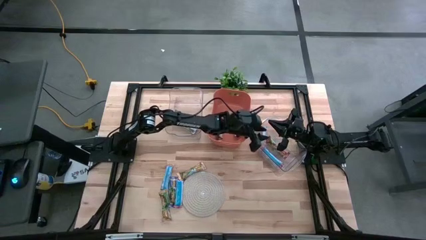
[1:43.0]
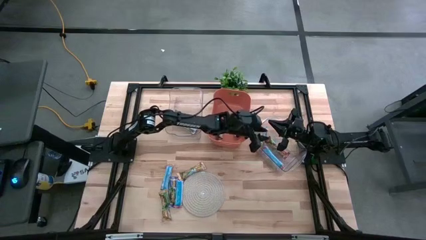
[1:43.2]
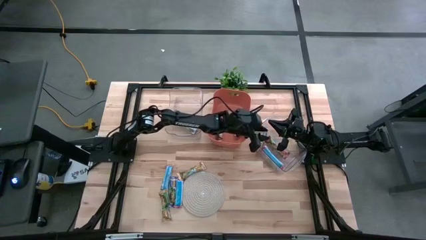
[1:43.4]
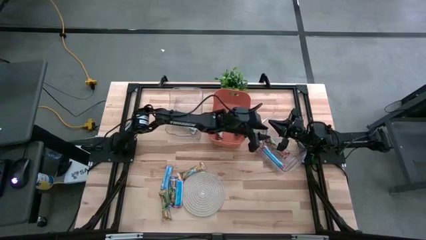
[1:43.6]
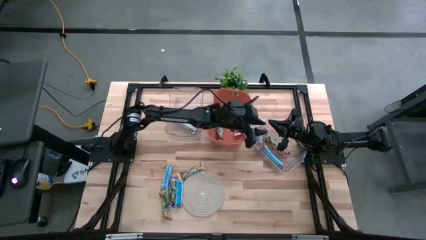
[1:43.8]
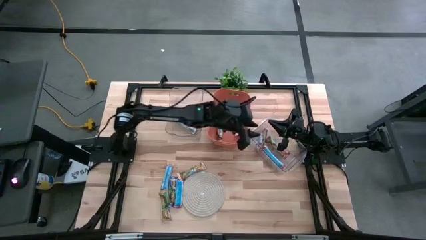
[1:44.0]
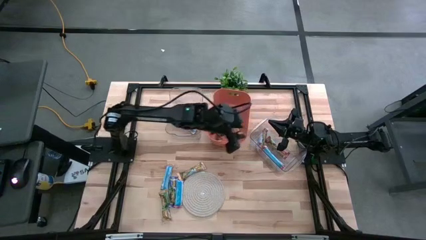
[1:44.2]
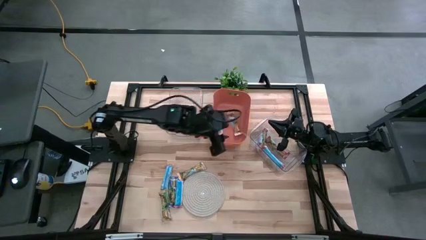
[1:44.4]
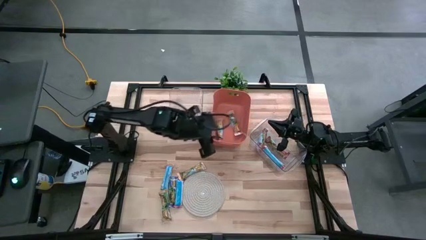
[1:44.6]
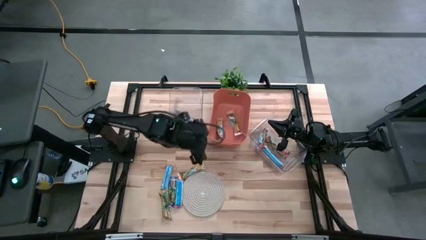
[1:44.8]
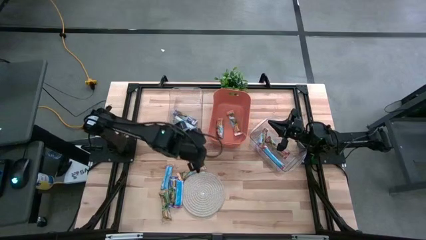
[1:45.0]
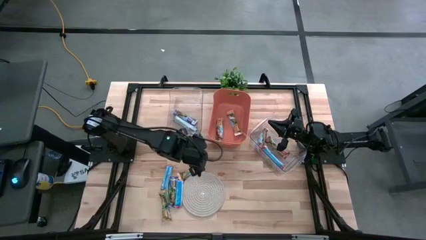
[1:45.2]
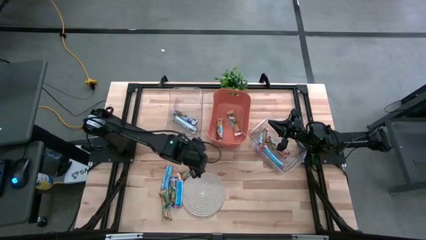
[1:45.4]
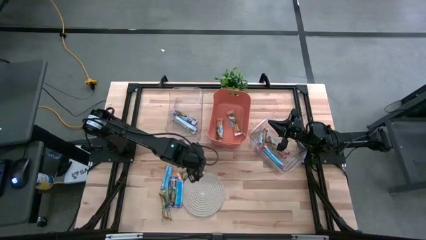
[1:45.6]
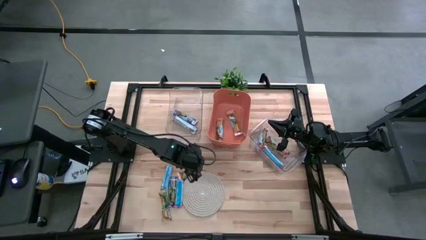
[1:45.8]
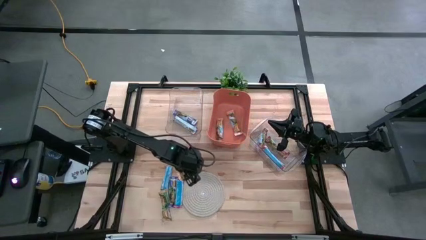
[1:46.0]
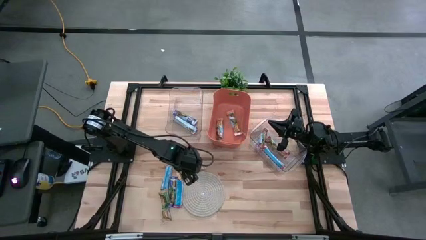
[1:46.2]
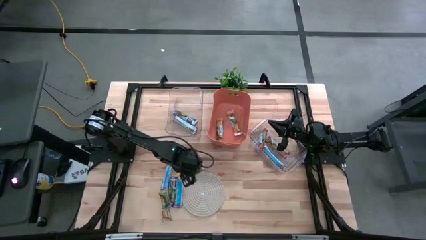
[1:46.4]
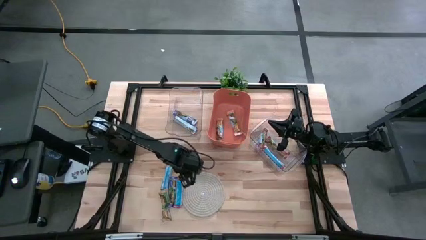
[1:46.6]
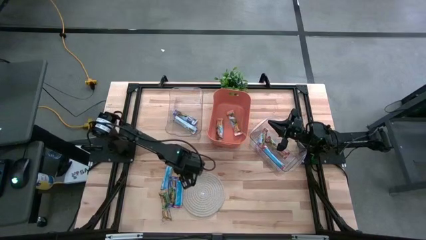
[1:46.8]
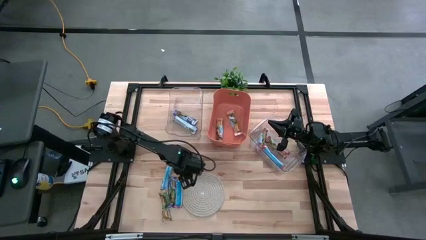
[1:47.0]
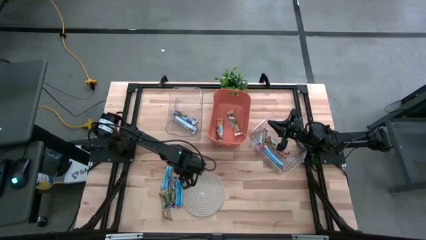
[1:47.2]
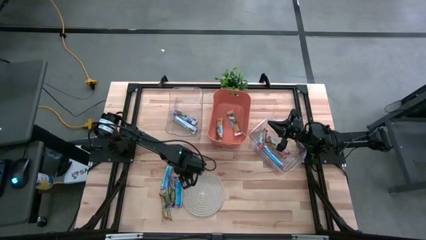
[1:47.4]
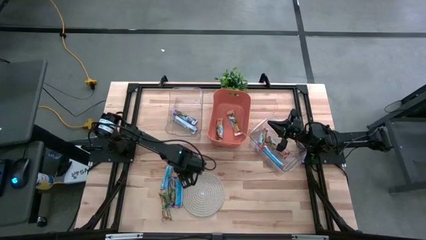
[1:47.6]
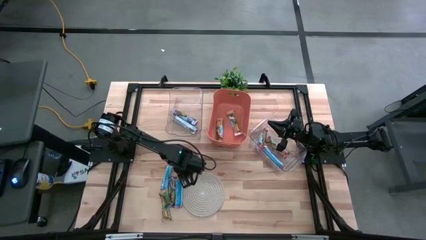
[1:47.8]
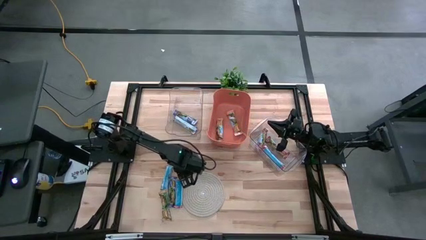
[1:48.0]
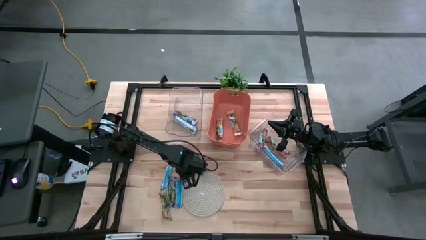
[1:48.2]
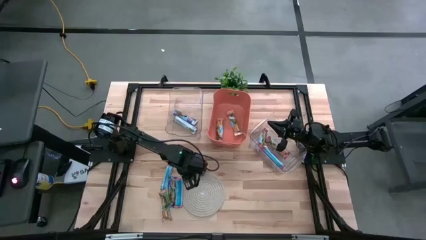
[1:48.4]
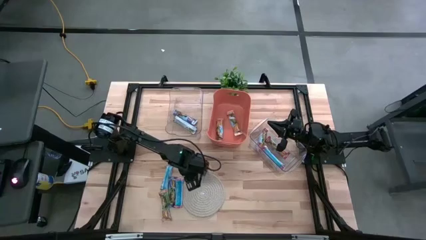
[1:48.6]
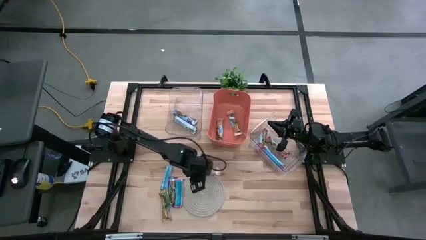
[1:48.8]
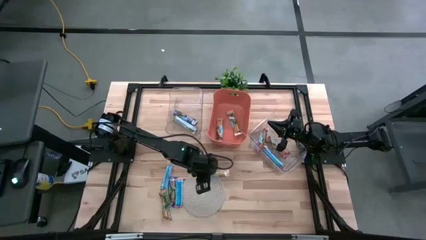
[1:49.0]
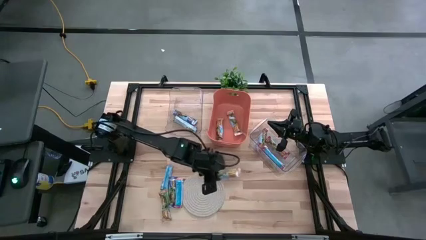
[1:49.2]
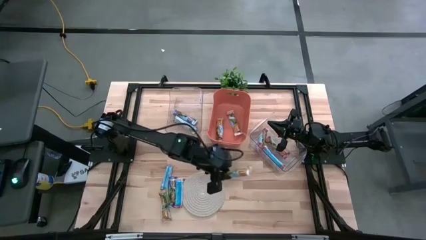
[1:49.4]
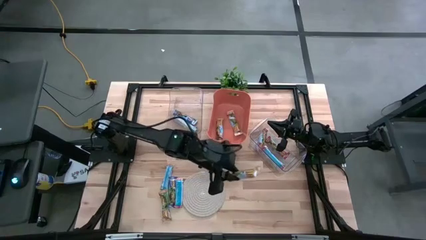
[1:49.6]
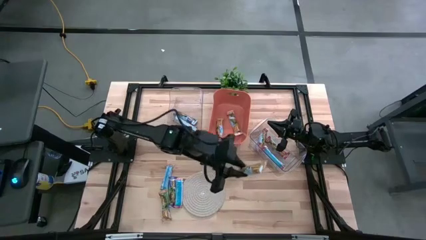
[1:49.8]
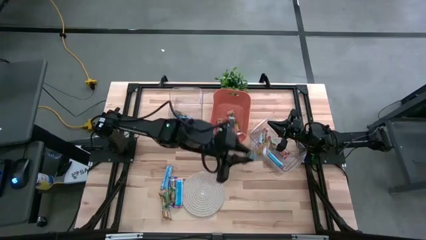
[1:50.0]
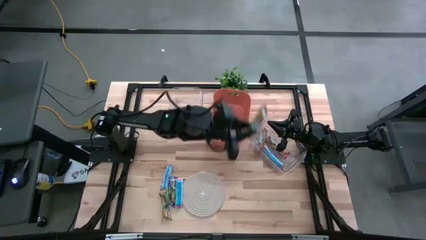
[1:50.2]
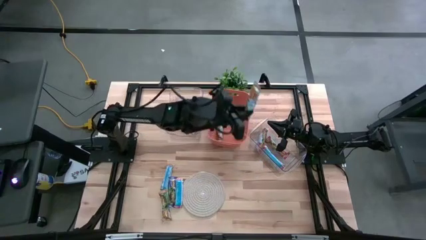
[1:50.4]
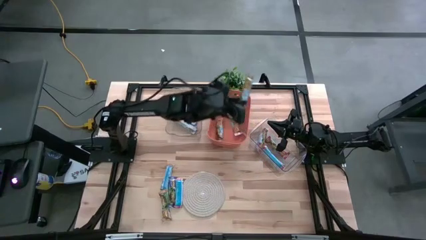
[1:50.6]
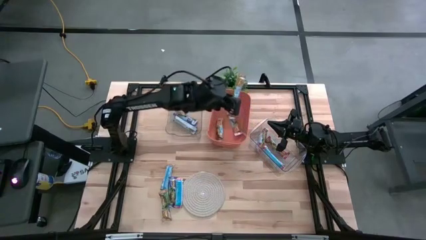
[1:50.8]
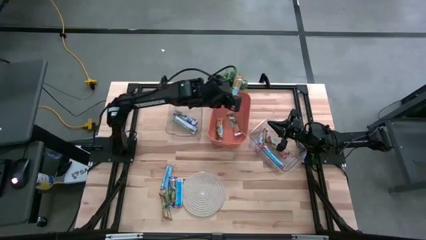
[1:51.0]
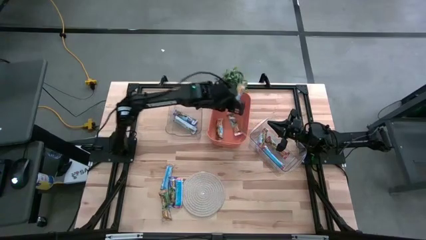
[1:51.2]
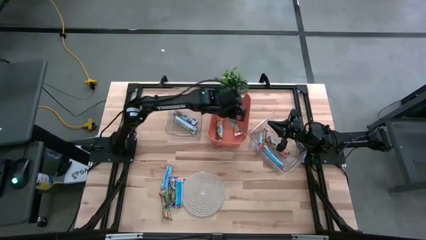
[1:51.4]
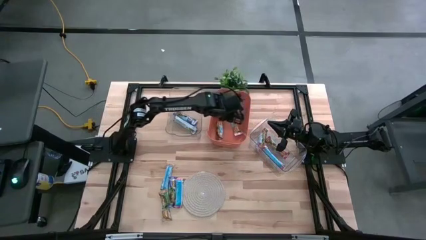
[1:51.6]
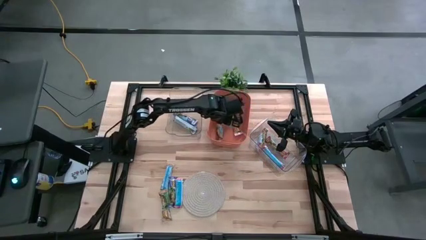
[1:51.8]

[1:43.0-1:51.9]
Task: Pick and place Granola Bars by type
Put the yellow granola bar into the orange bin

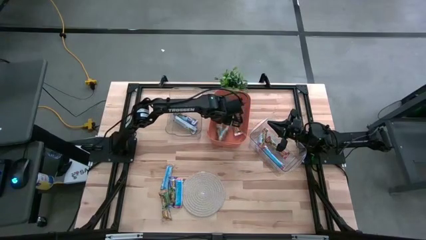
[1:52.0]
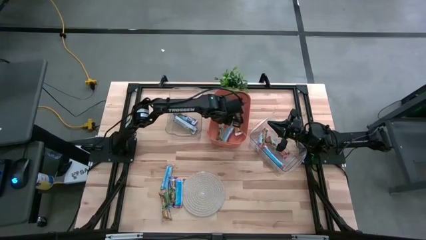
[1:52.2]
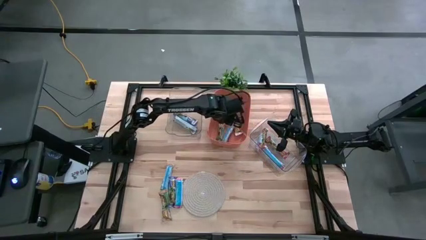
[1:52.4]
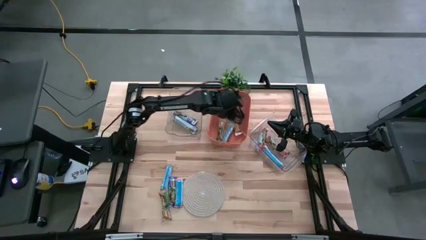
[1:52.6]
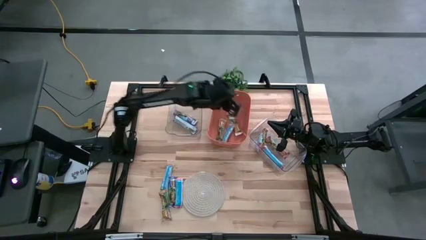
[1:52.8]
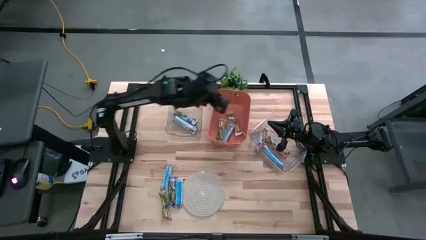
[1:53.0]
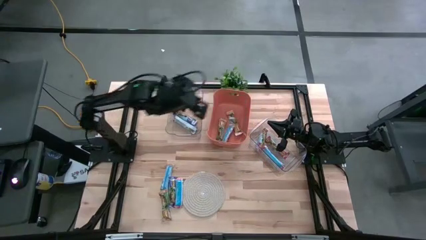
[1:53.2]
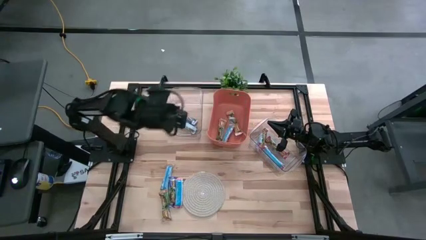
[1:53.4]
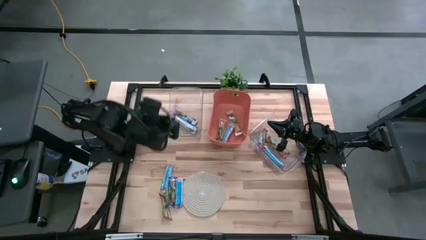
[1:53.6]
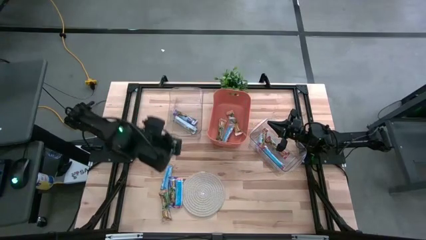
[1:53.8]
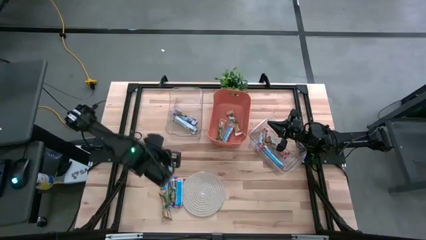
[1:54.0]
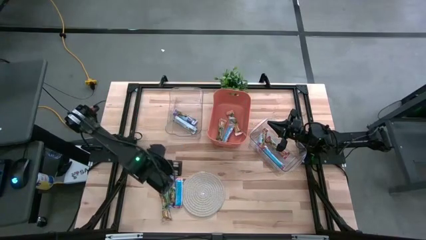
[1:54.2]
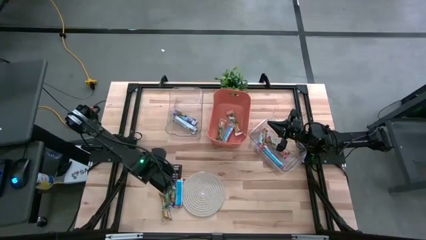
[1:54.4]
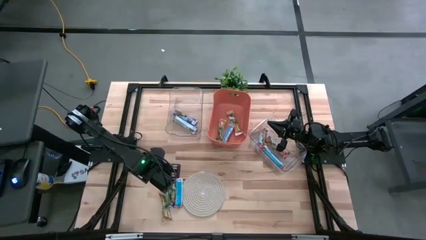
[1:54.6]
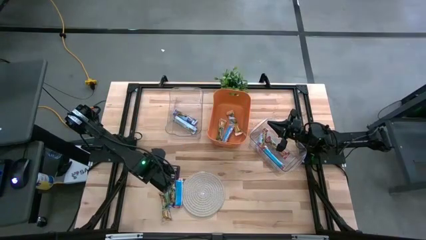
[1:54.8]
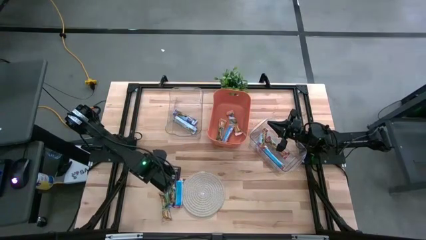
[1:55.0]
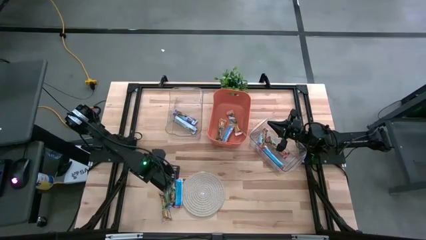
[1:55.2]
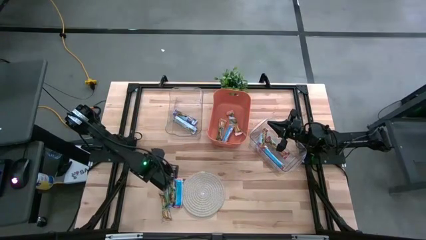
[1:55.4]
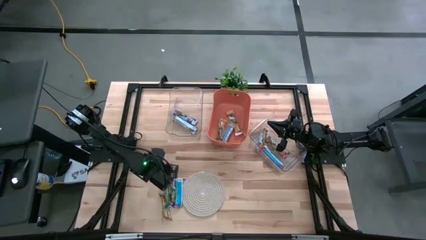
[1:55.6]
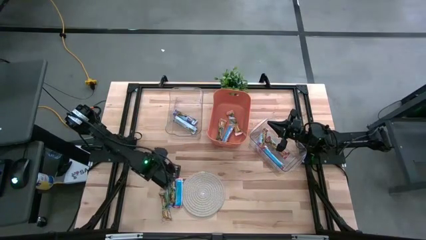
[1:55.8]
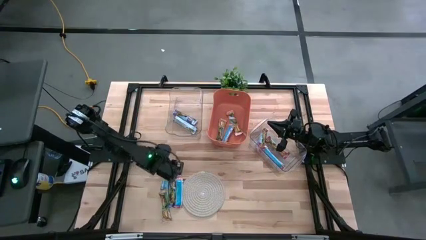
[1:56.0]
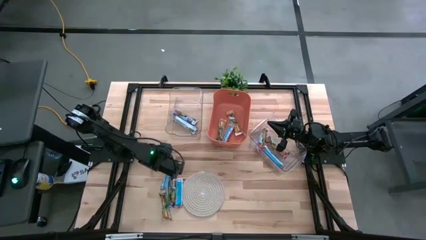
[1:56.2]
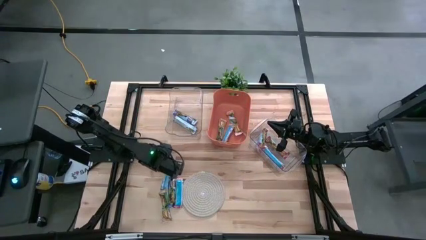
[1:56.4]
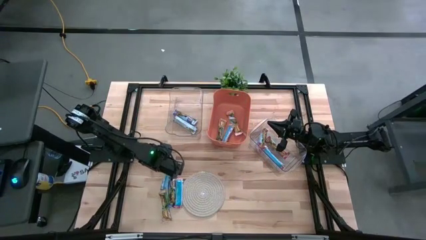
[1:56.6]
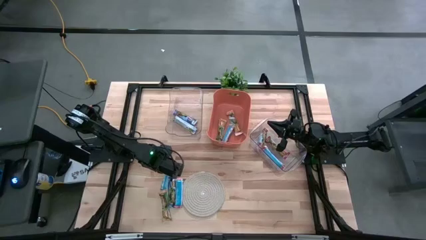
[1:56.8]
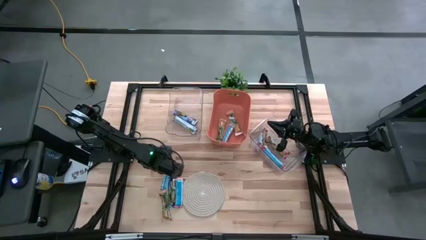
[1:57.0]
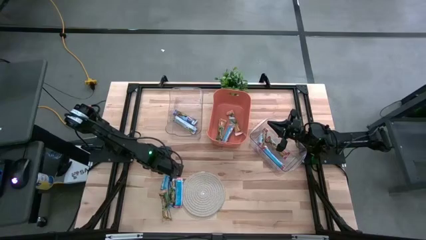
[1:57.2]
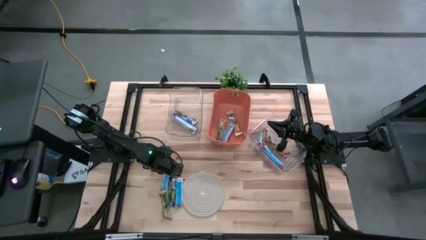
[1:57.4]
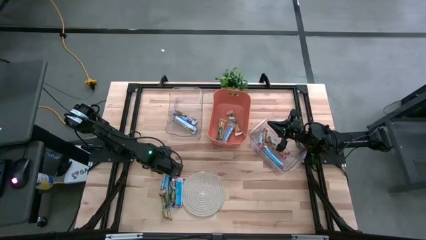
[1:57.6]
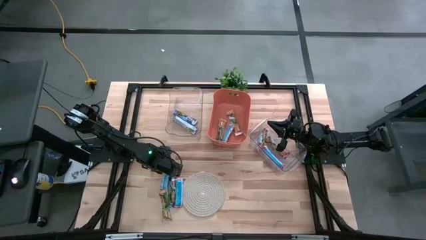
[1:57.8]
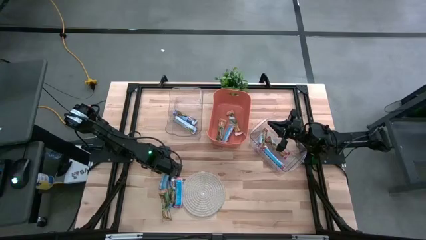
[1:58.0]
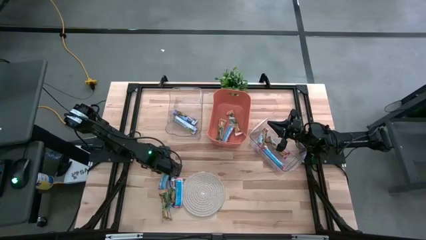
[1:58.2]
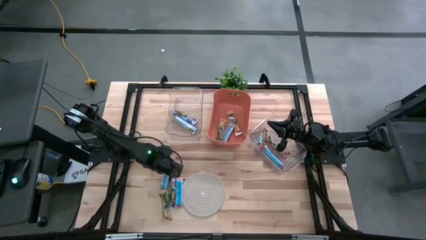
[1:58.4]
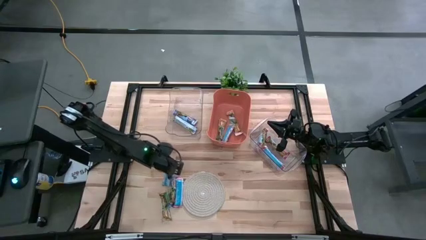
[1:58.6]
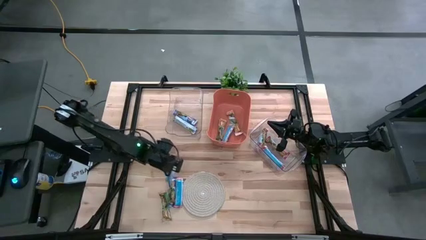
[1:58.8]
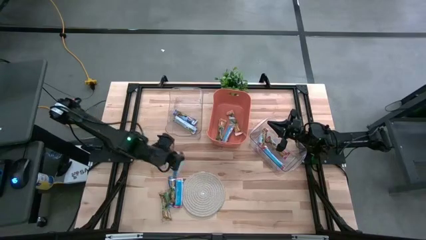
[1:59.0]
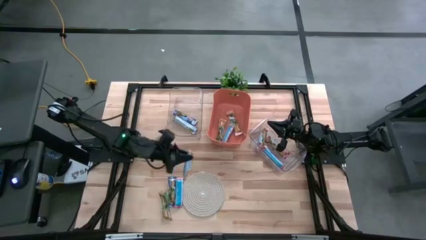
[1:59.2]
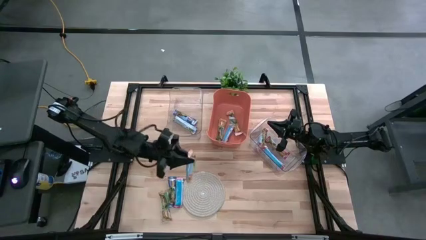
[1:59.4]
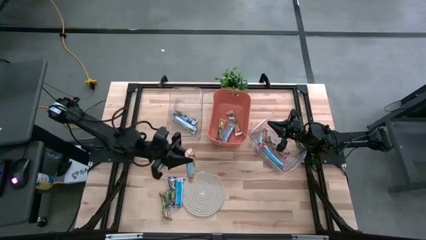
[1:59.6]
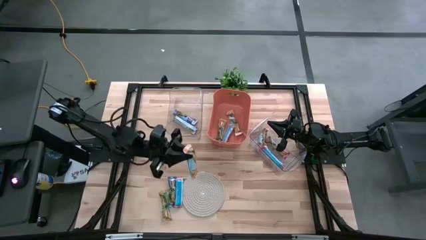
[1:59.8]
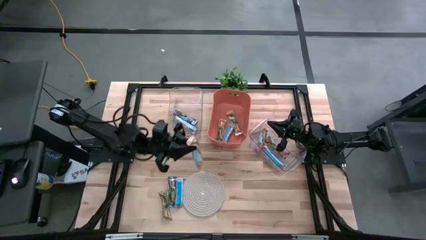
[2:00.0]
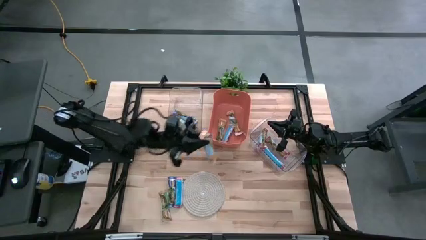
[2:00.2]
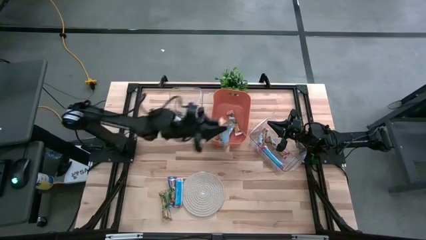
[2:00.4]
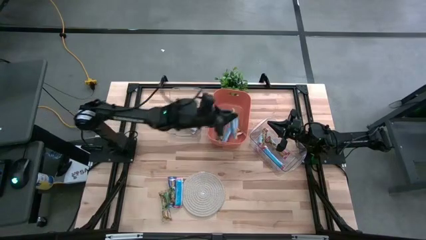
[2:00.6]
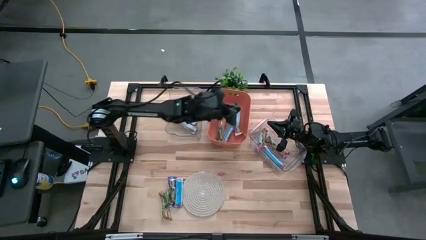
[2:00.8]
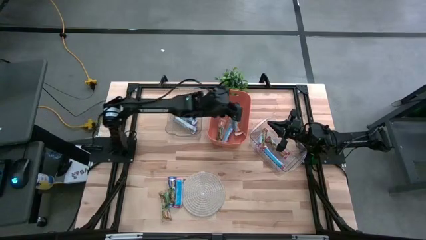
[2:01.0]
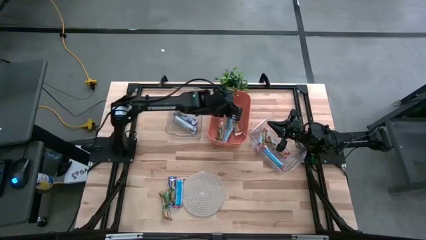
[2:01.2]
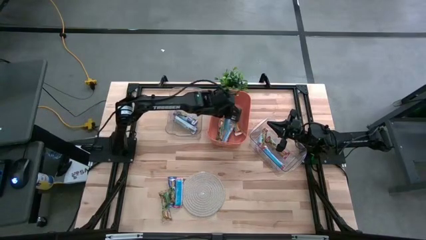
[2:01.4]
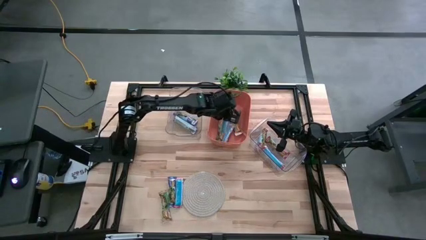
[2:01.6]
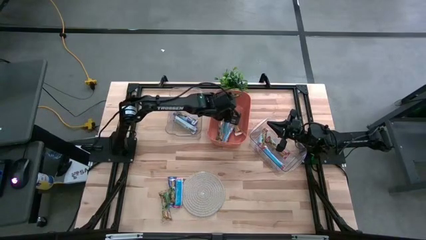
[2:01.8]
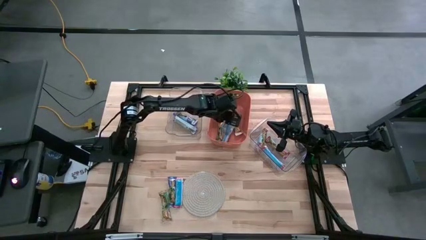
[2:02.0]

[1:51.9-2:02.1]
Put the yellow granola bar into the orange bin
